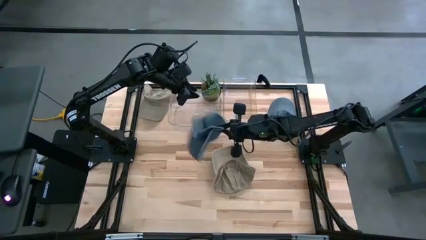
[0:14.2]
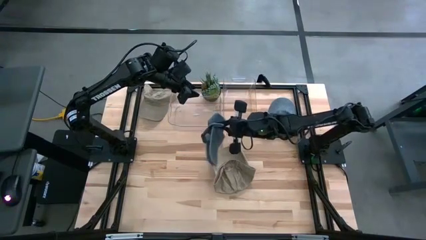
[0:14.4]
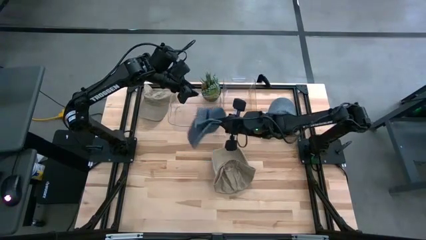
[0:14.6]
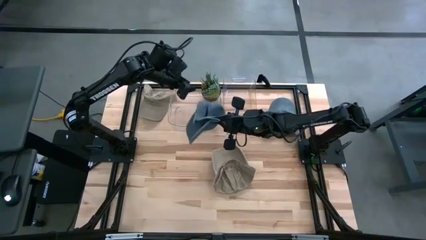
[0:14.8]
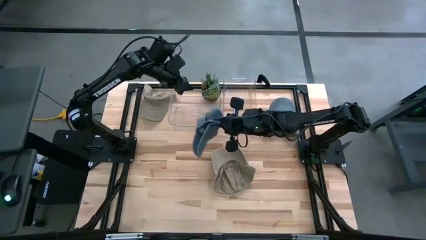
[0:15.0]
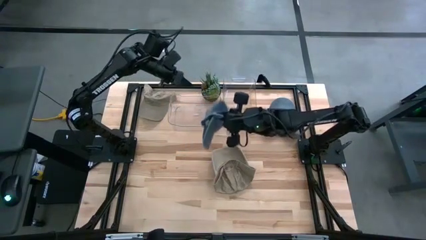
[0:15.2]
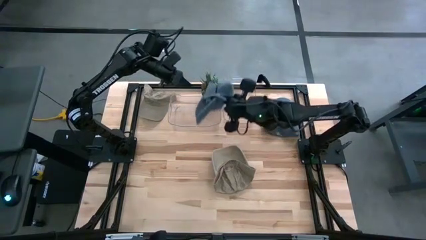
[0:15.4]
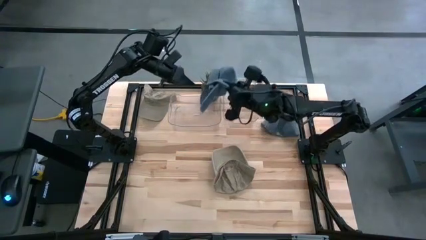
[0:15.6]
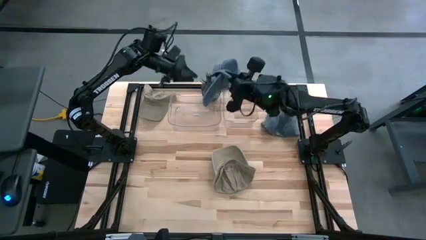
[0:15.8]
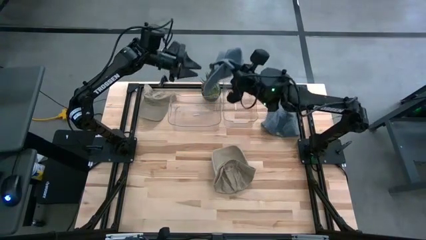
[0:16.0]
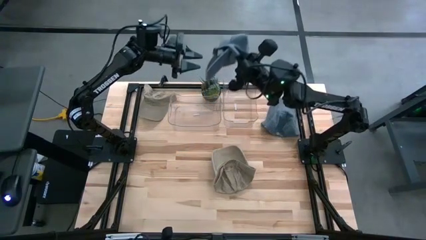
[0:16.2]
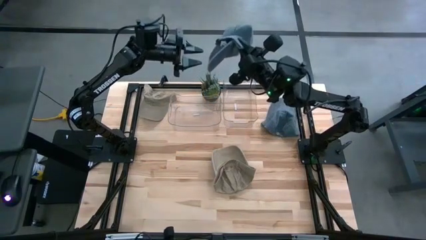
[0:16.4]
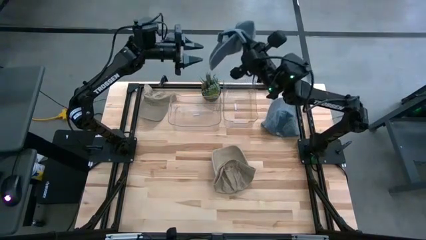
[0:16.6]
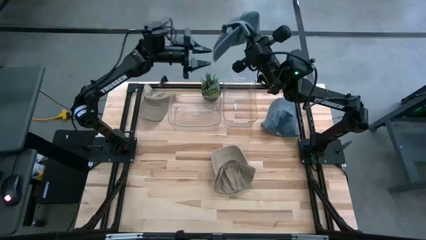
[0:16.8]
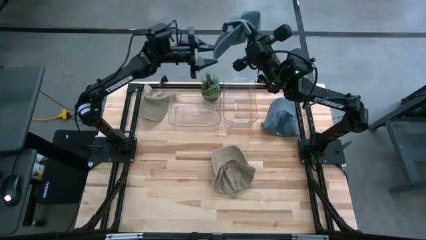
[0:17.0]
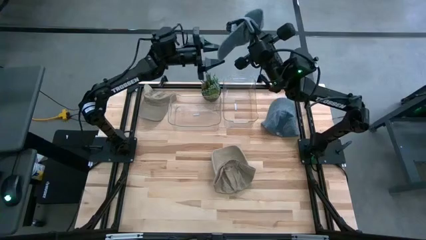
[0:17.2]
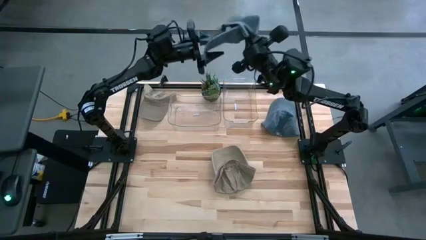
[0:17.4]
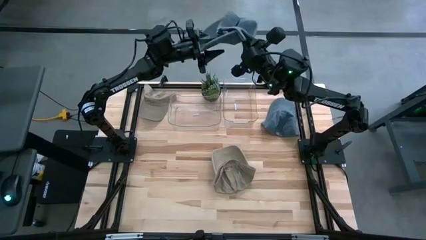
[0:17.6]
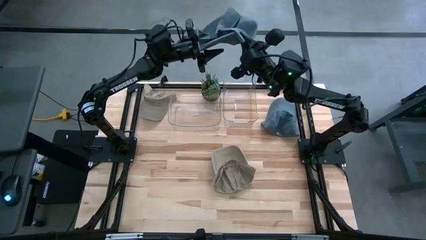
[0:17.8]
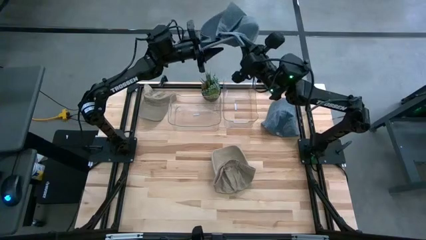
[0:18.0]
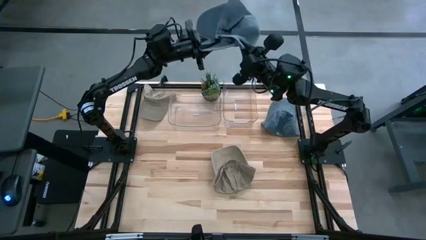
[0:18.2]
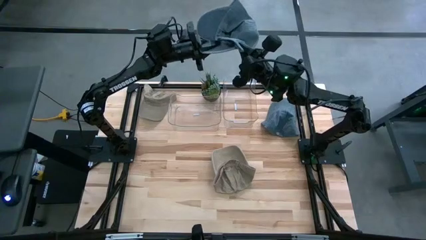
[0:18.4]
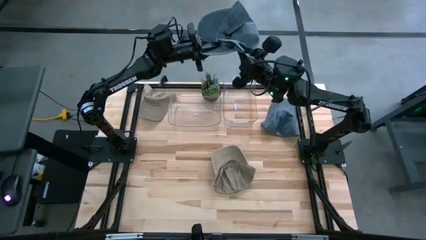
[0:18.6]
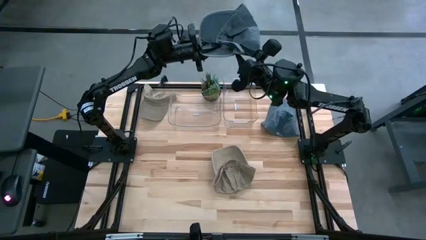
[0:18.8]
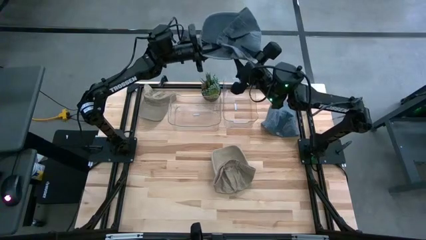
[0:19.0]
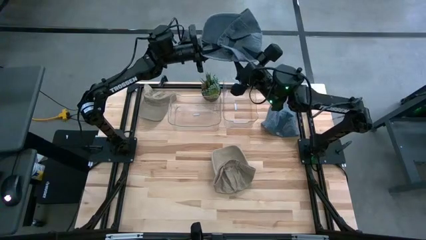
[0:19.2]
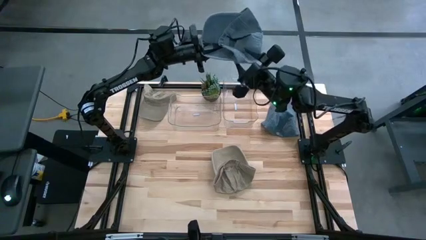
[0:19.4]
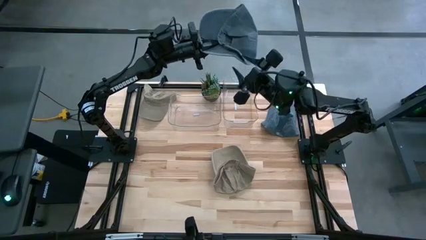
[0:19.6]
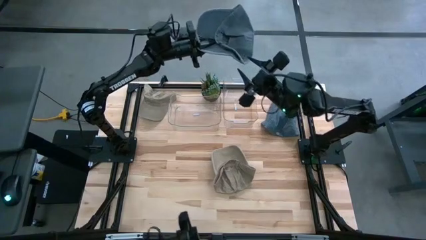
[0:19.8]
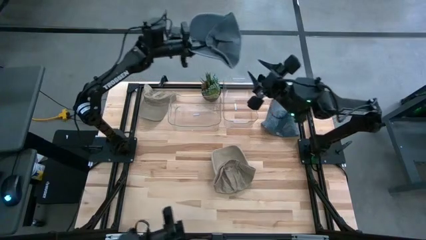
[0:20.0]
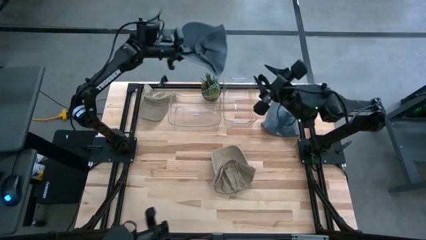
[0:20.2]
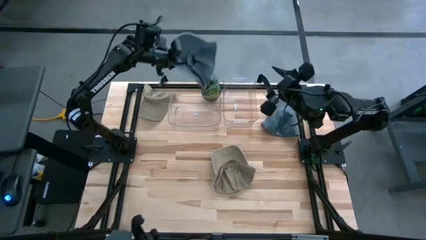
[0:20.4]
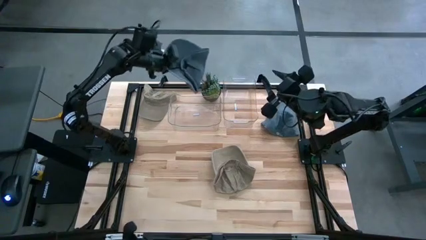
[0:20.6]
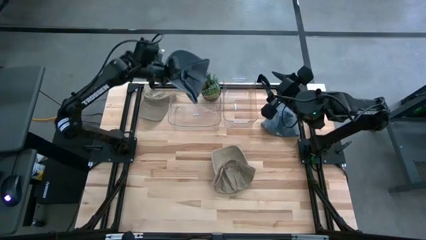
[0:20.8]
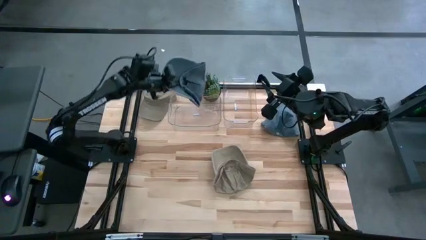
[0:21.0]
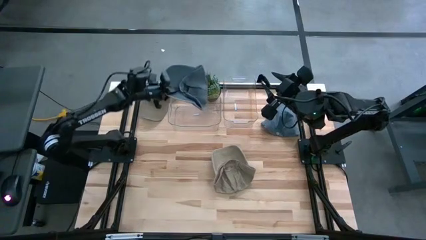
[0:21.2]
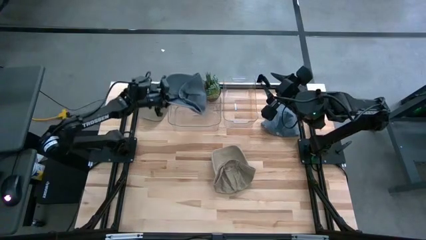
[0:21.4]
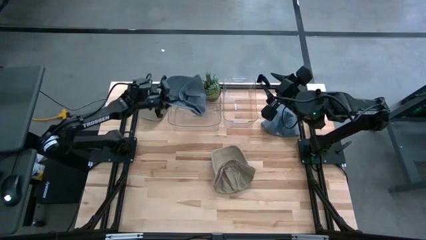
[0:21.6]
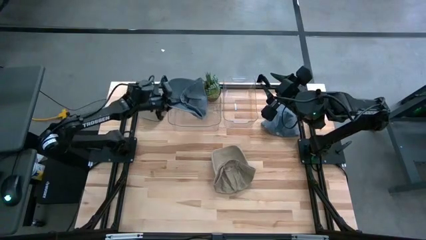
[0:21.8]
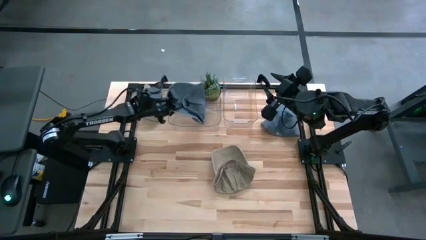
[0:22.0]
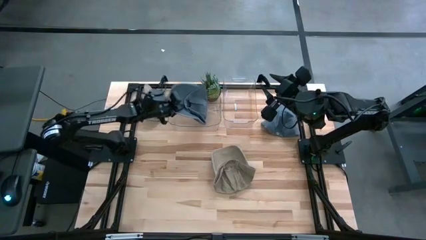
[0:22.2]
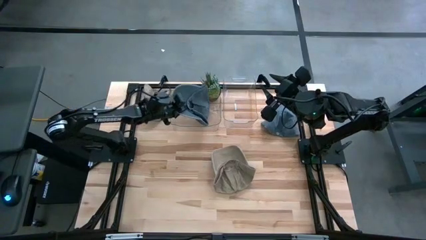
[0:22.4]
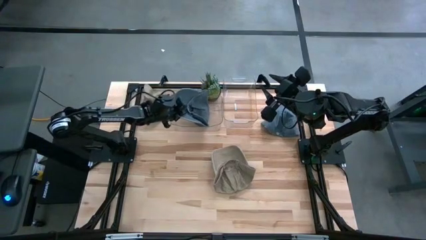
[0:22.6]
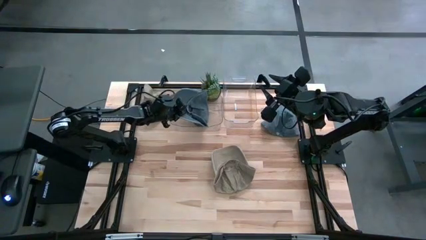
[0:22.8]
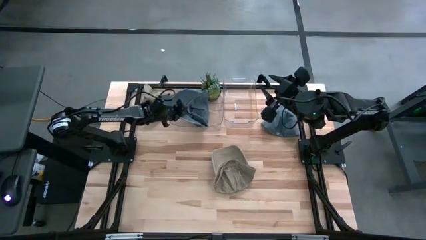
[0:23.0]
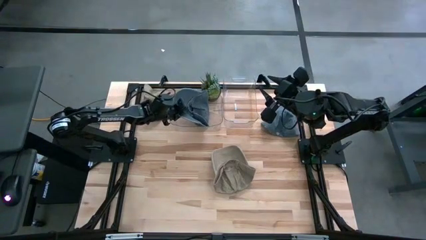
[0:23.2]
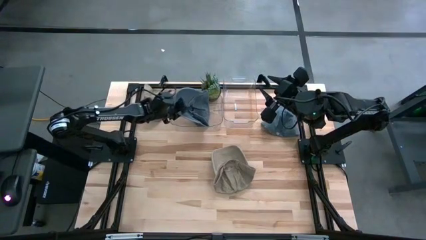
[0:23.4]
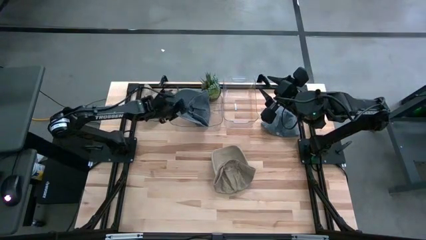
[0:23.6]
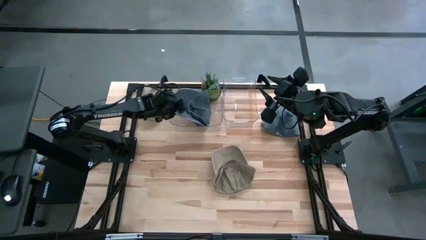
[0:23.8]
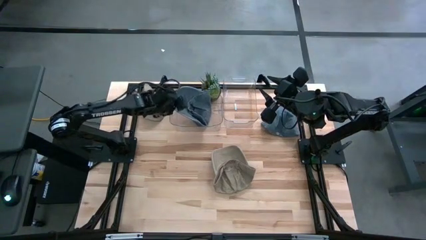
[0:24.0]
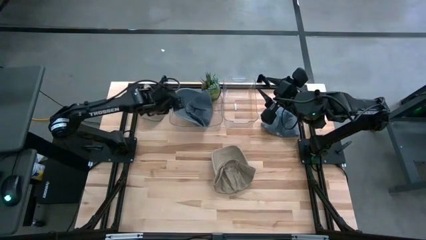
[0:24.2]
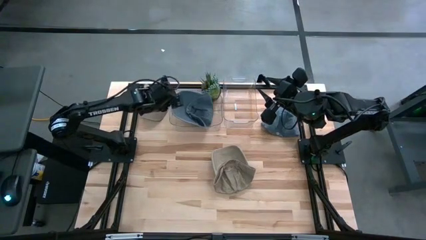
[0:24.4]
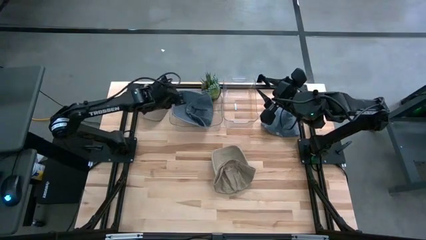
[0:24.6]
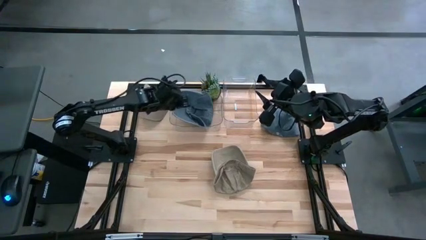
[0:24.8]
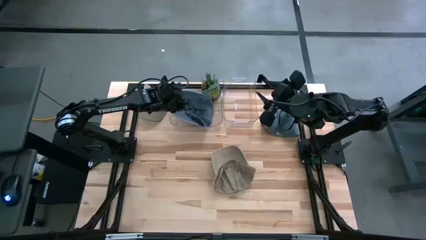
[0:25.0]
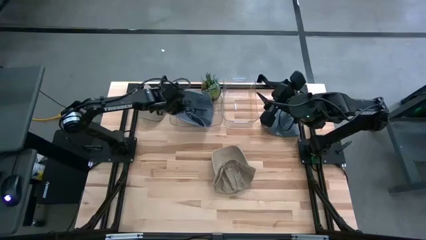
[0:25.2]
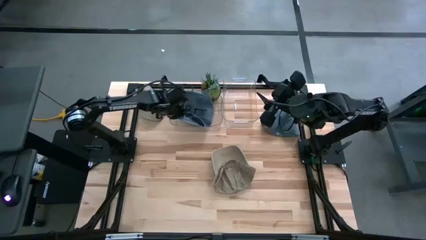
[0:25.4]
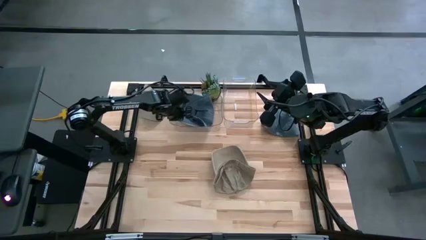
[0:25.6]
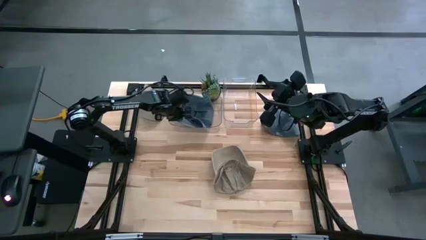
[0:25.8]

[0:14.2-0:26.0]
Task: Pick & Place hat
Put the bottom gray cap into the left transparent bin

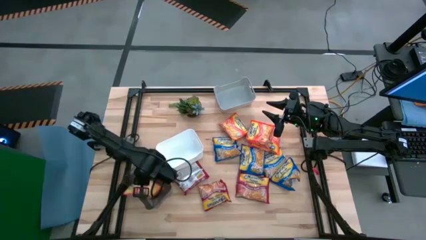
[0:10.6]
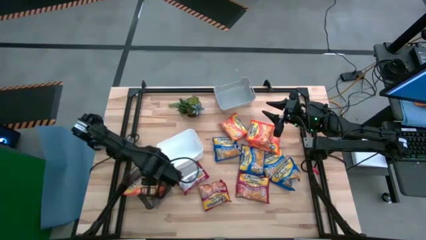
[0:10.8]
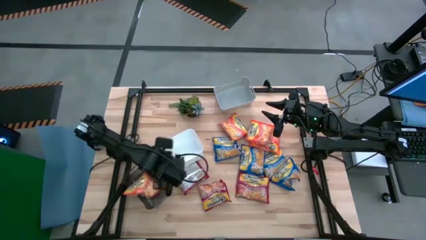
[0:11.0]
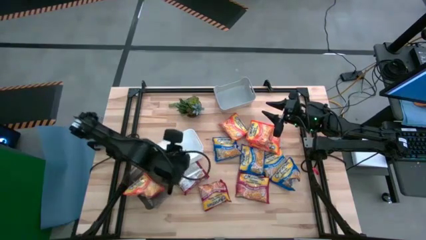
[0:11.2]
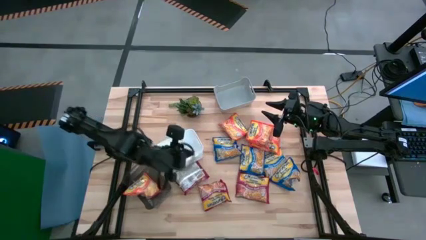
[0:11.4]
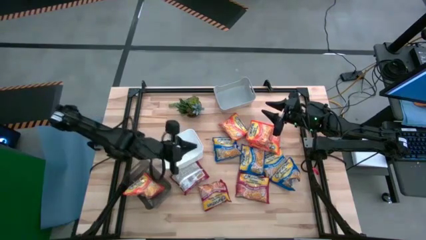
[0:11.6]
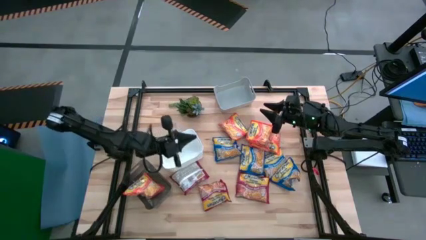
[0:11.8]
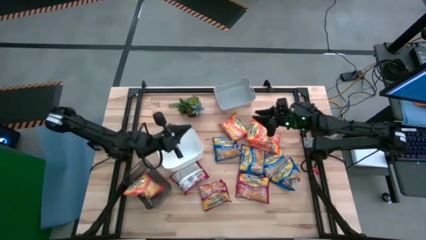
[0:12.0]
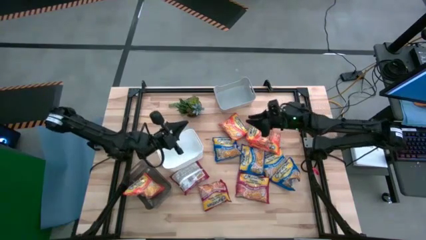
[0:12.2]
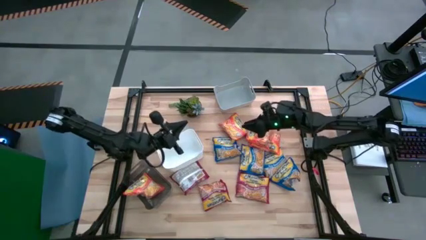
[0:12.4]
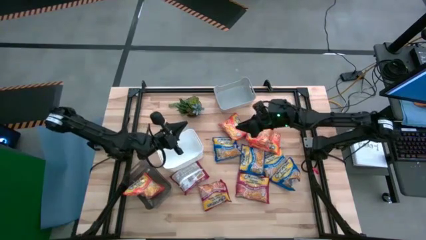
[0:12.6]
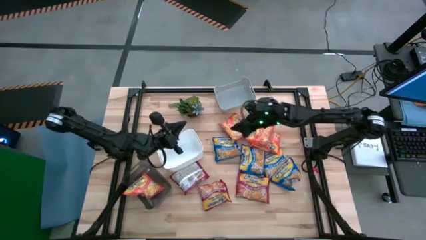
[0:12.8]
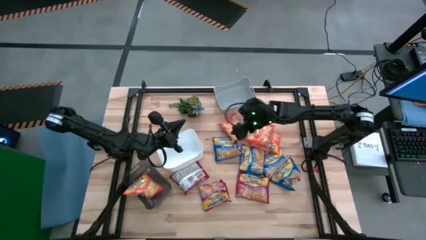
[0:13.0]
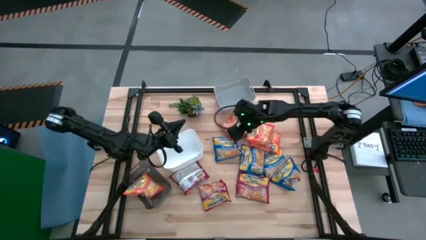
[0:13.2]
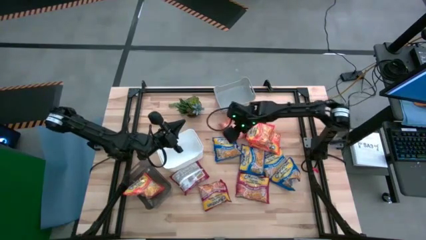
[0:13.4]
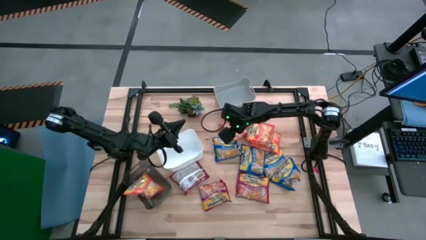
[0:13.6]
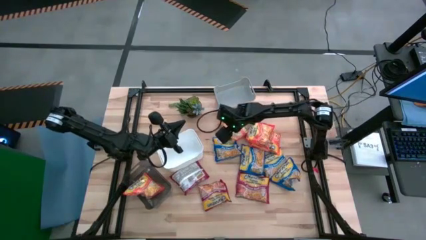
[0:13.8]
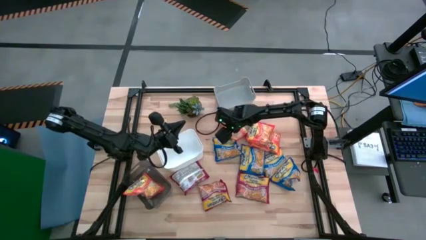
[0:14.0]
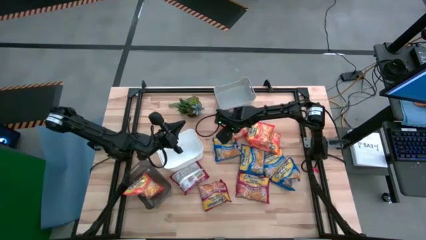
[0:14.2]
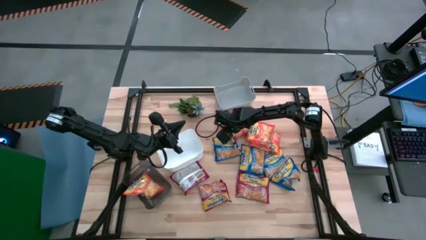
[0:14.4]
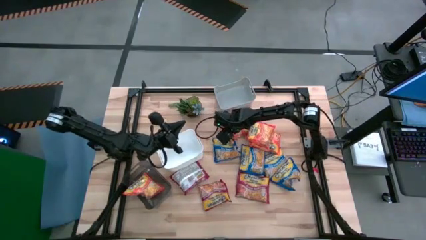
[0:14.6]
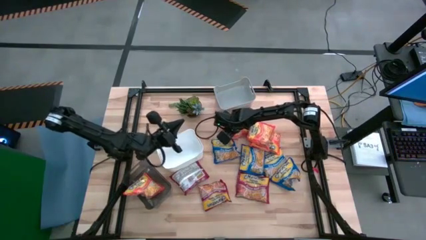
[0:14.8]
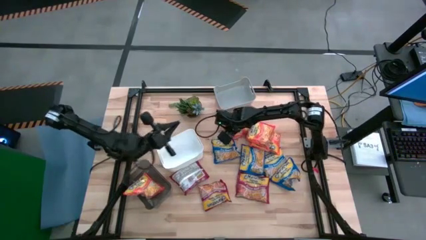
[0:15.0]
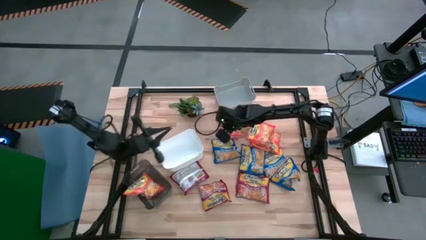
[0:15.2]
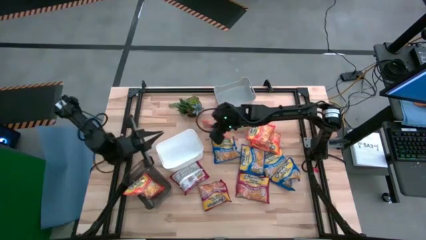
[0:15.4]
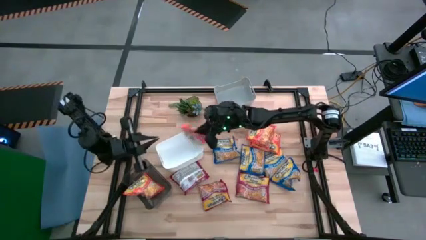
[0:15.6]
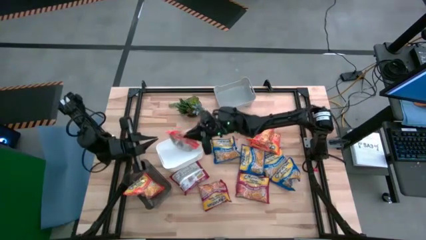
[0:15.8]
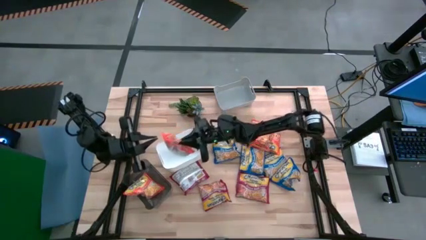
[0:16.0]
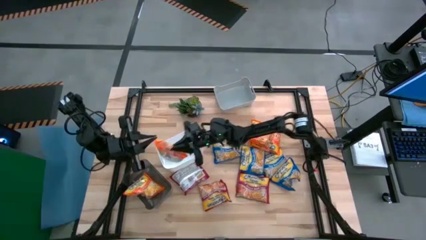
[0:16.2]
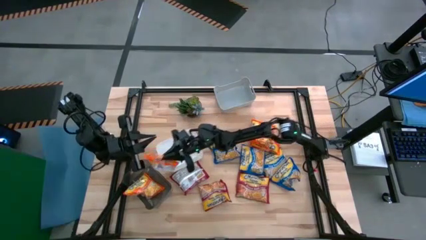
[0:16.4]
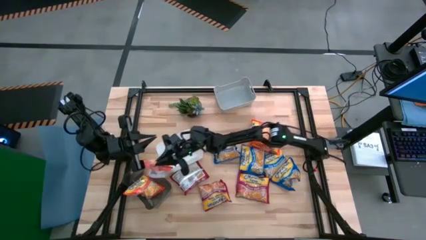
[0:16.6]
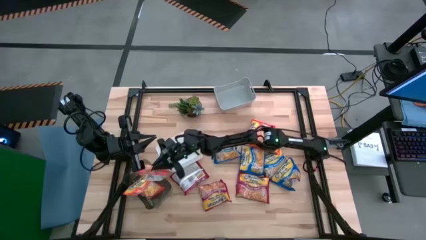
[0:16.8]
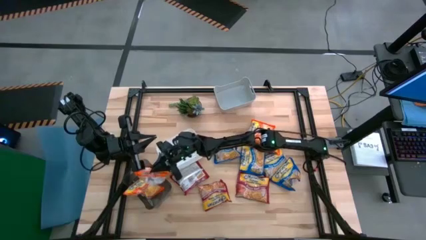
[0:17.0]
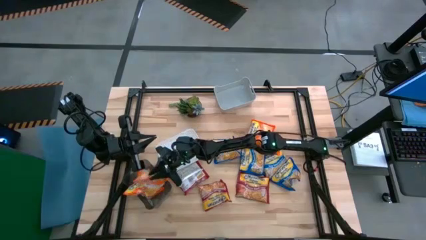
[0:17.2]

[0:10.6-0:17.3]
Task: Sort Maruchan noodles
Put the orange noodle pack into the black bin
